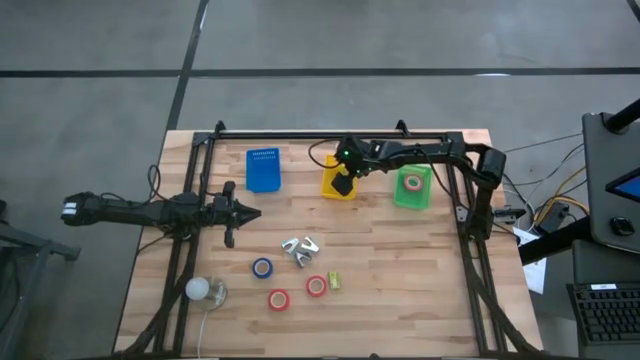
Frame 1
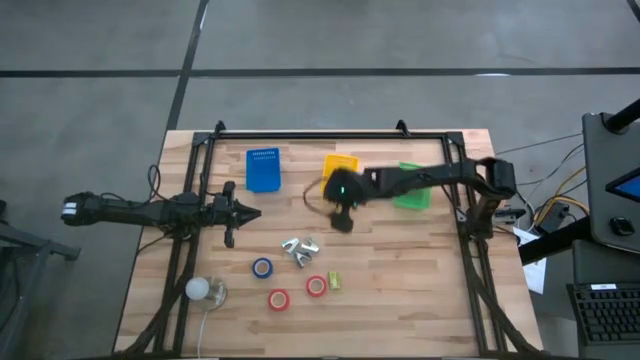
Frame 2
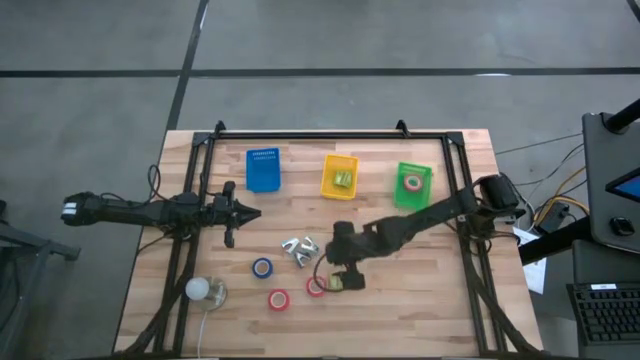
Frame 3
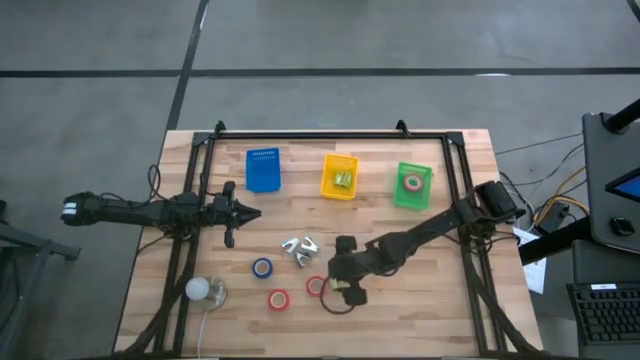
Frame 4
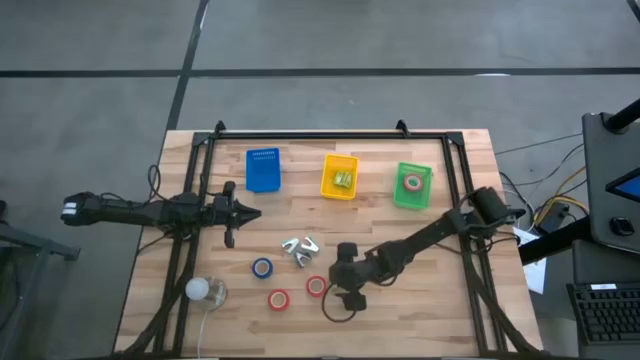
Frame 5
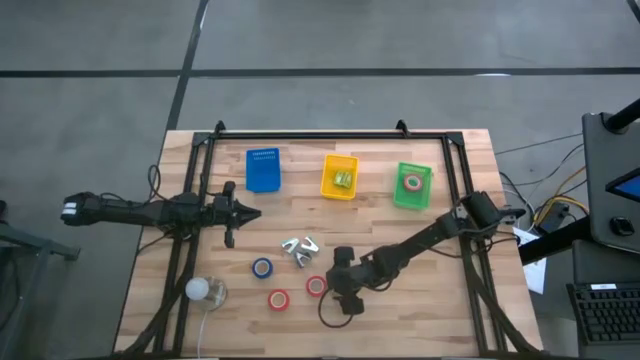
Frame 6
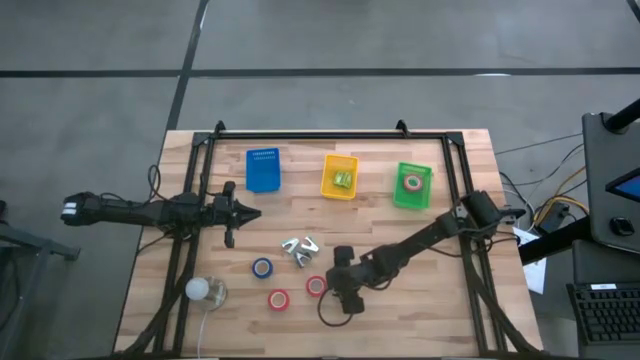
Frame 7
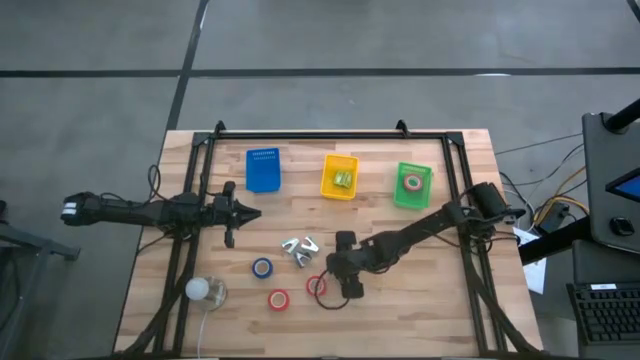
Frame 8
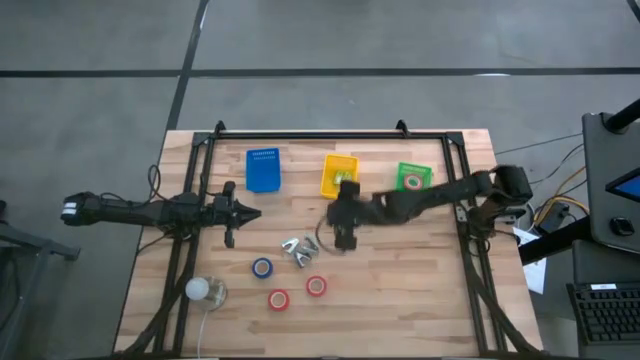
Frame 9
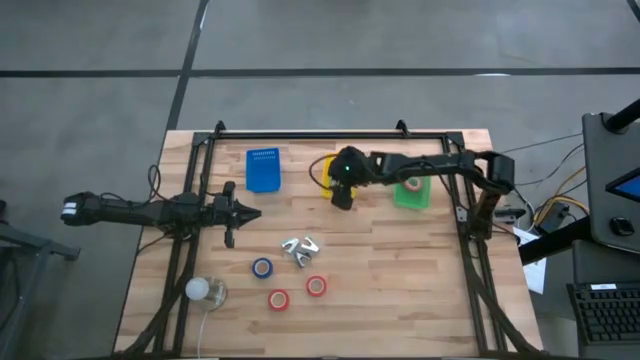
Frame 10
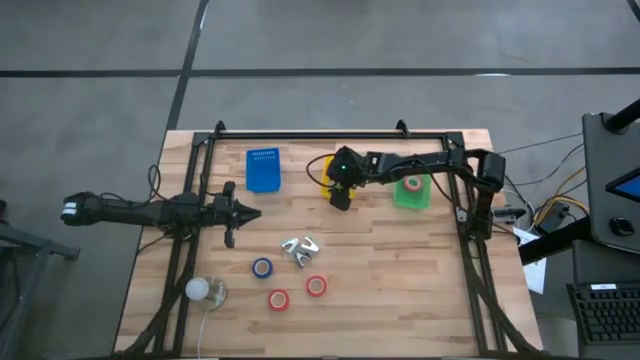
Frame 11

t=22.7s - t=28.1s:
Task: Pick and place Stapler, Stapler remover, tape
Put the green staple box into the yellow bin

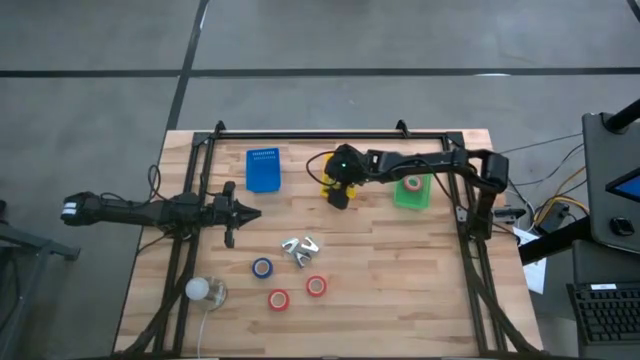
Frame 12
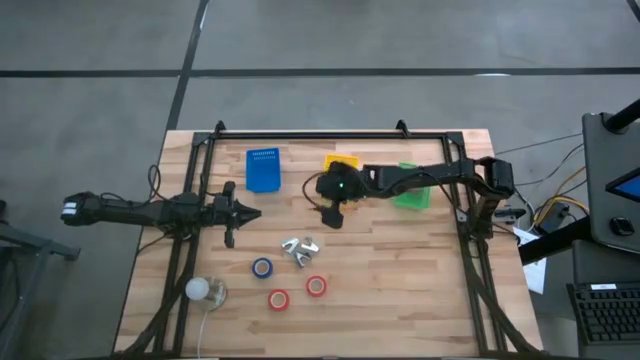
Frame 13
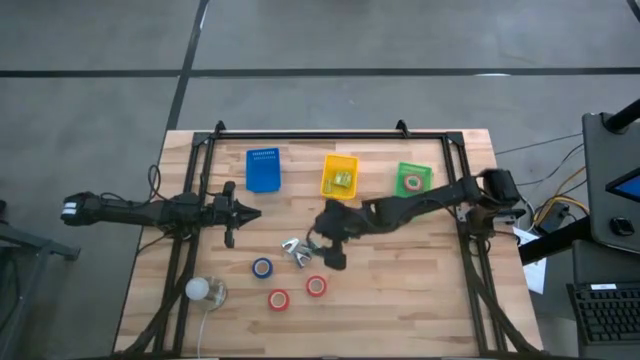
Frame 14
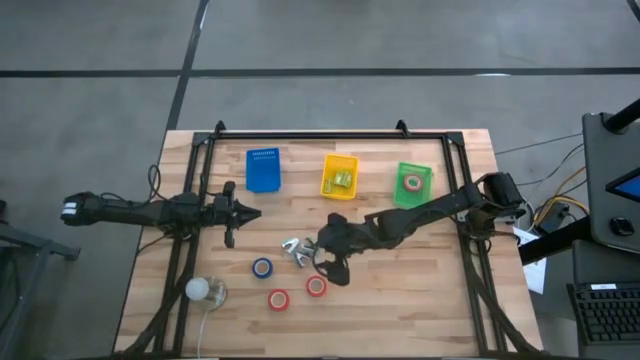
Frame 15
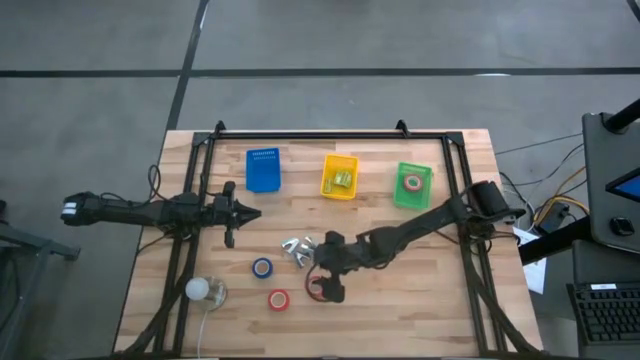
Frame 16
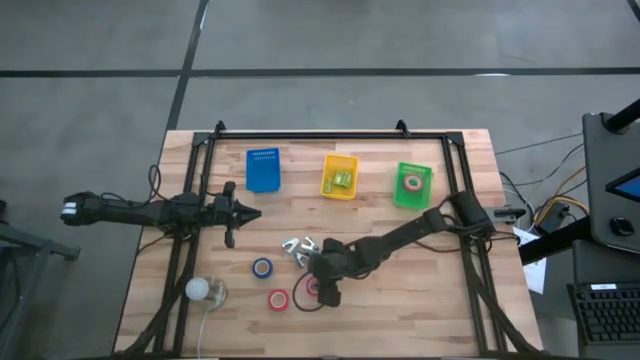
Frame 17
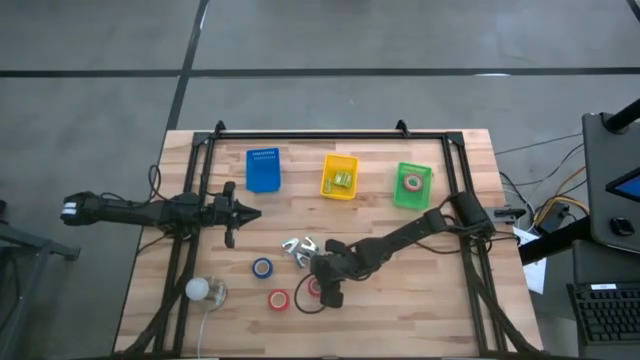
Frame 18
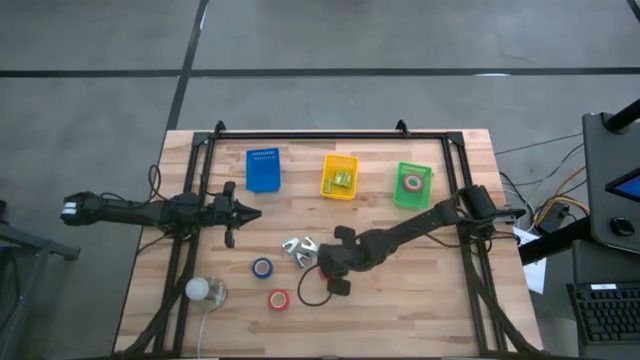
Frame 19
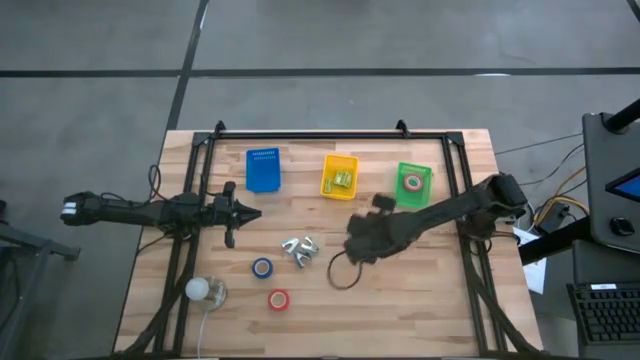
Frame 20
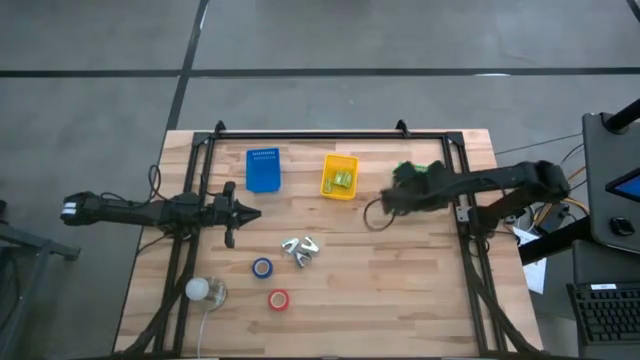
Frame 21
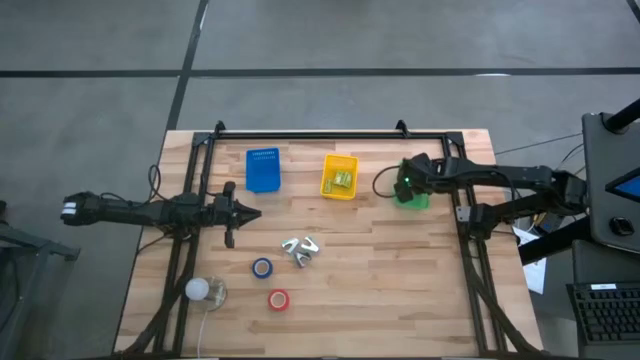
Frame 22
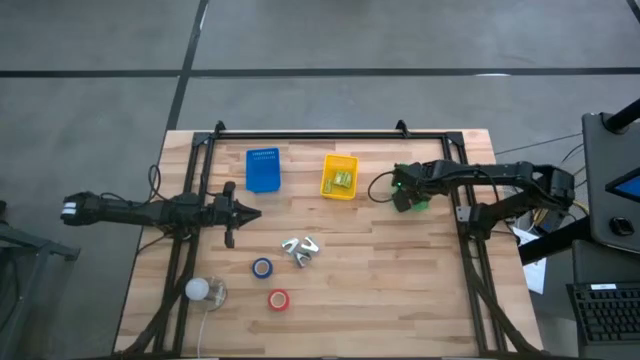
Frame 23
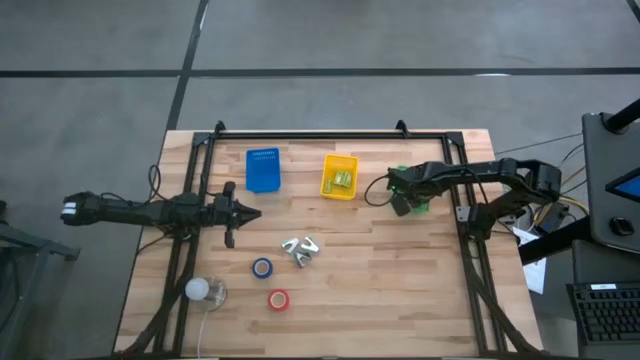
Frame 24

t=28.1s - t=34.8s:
Put the right red tape into the green bin

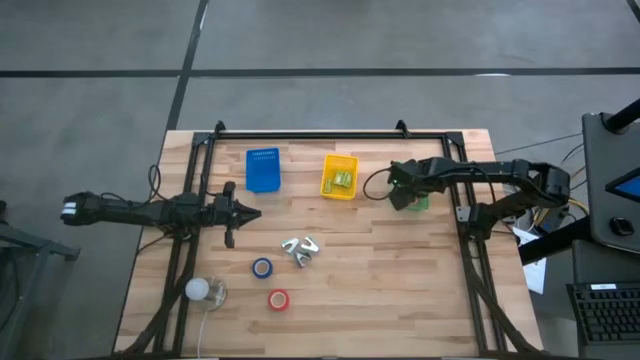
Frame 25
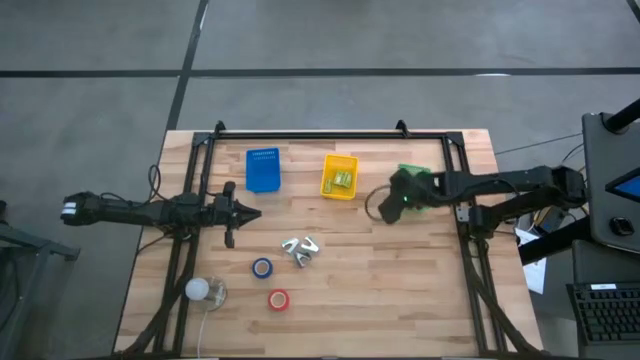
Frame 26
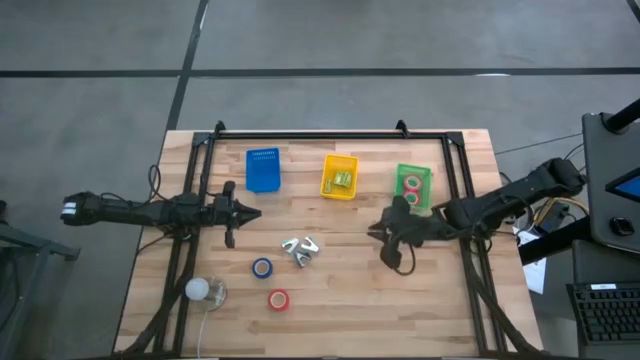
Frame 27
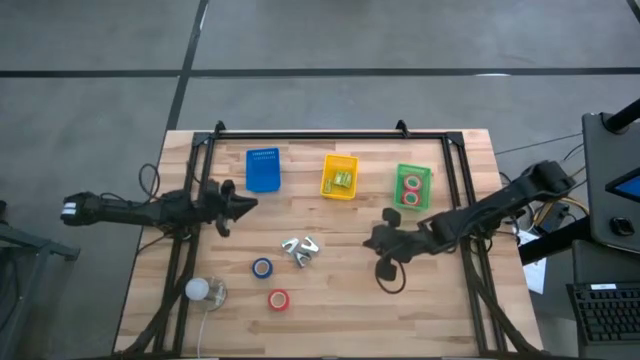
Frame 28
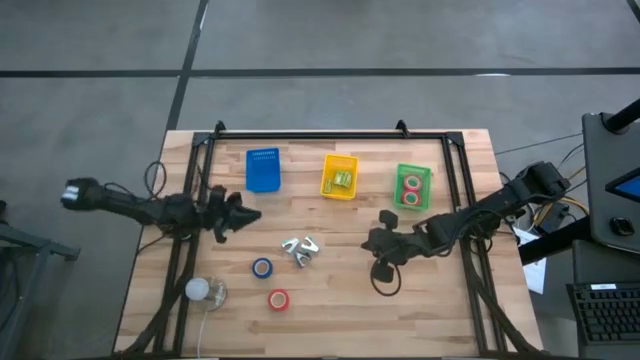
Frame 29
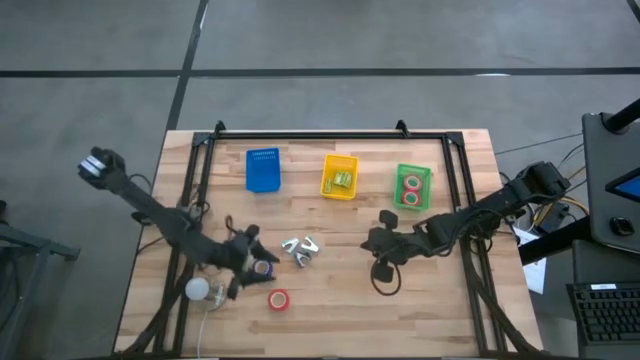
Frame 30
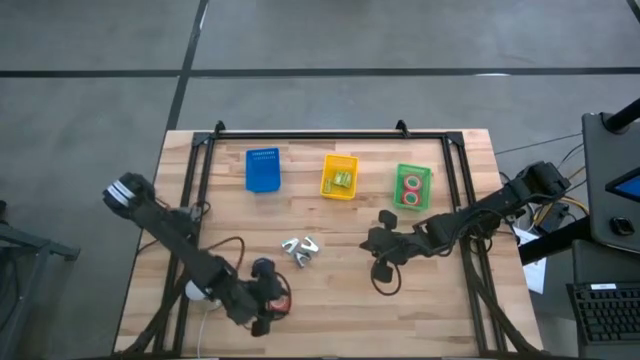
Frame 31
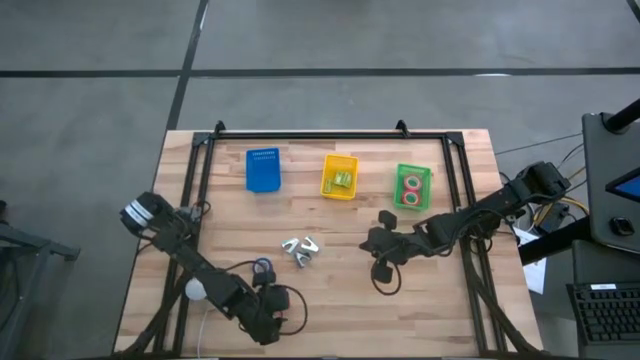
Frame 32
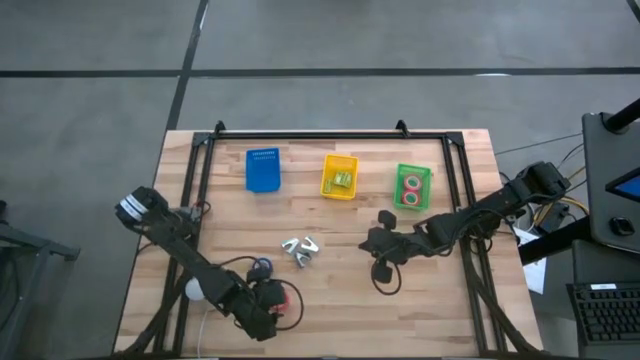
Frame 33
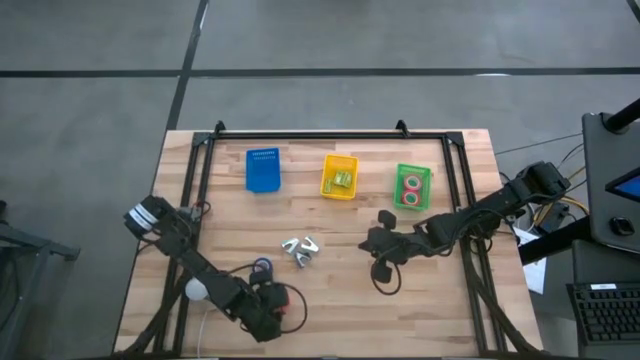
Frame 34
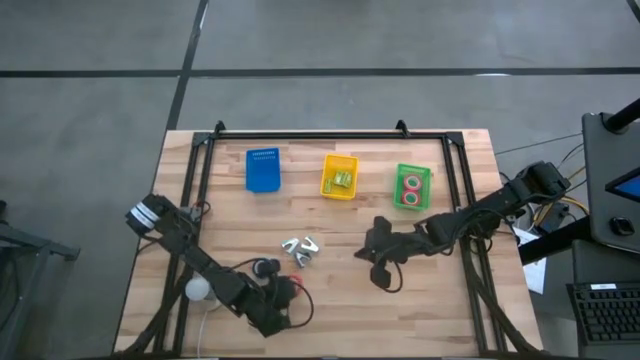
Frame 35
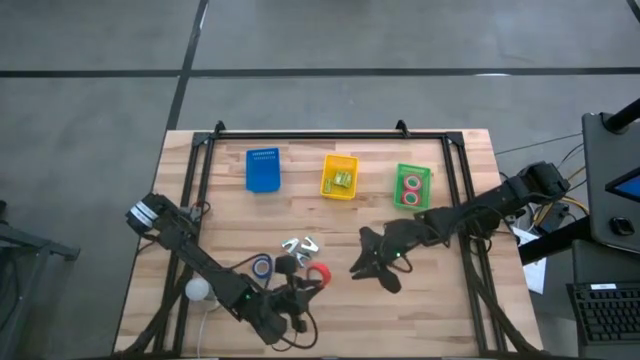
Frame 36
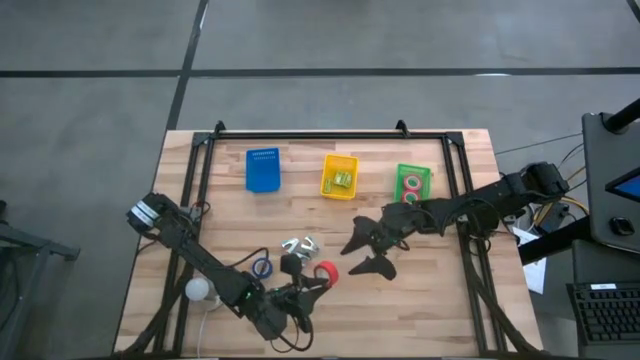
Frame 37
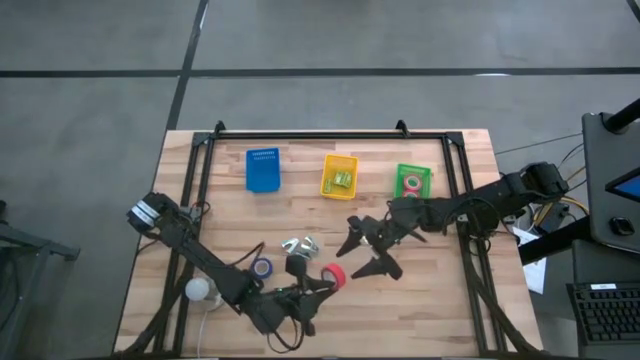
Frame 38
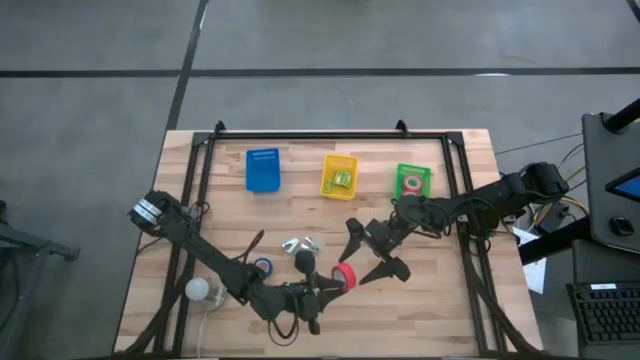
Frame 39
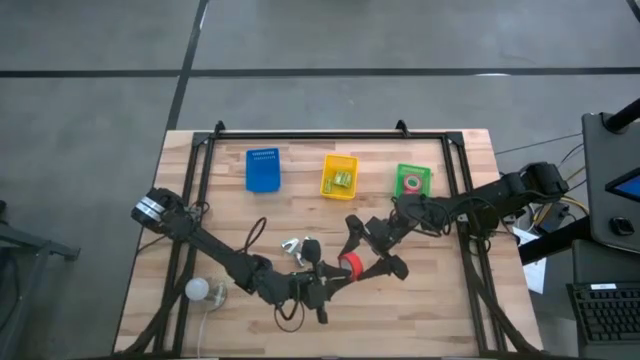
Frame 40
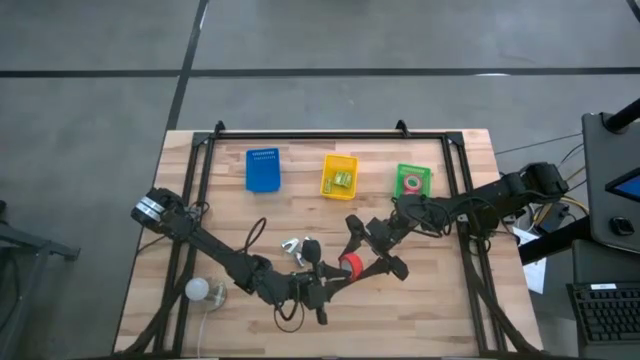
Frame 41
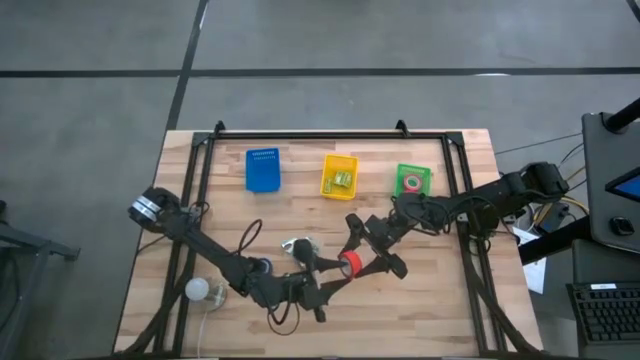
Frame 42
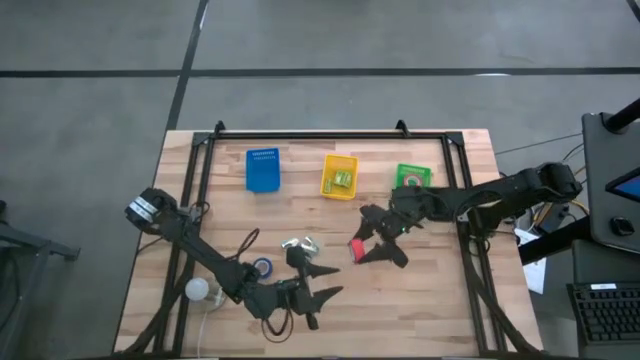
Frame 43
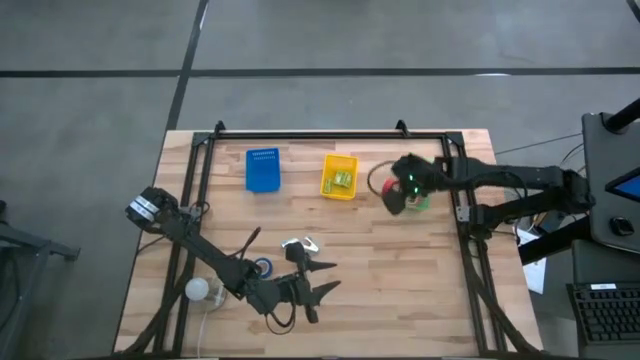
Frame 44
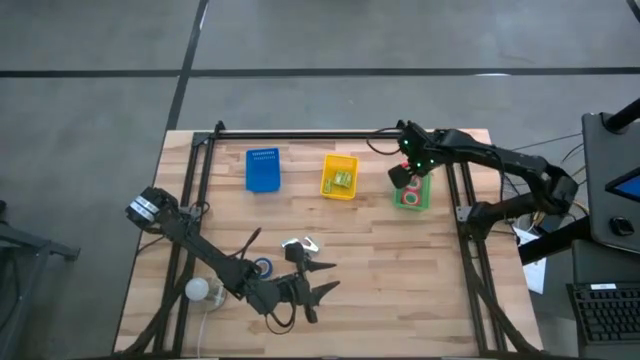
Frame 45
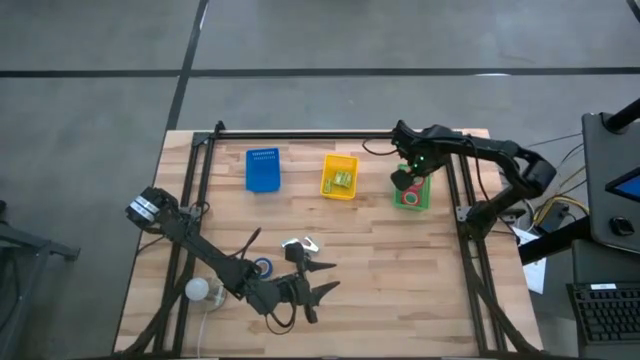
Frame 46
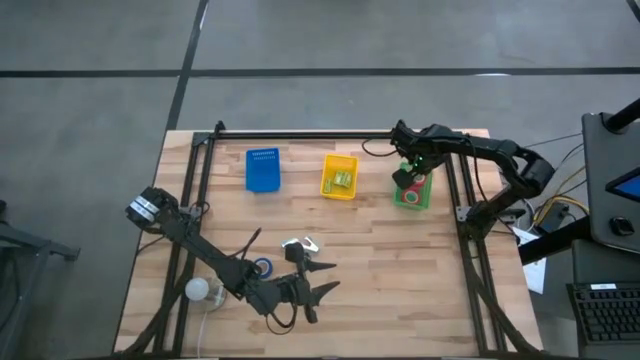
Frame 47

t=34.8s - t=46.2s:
Put the red tape into the green bin
